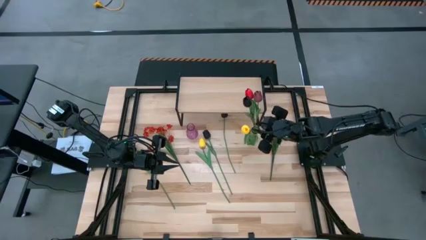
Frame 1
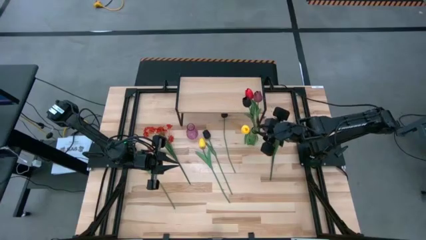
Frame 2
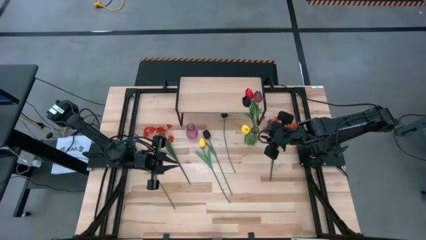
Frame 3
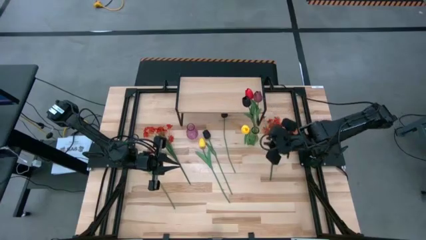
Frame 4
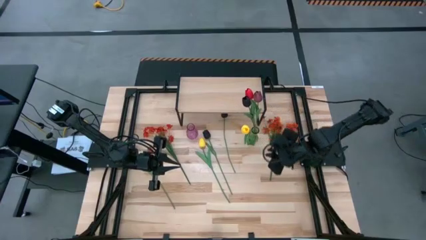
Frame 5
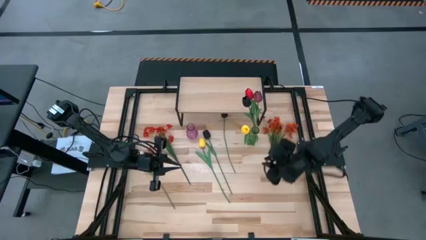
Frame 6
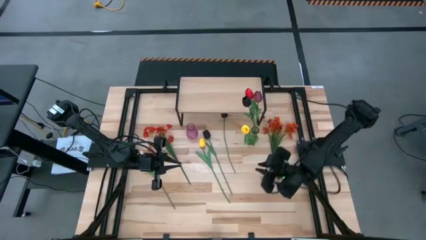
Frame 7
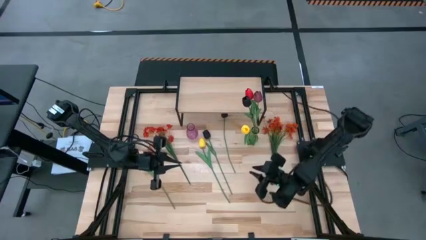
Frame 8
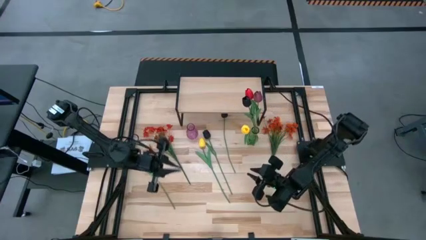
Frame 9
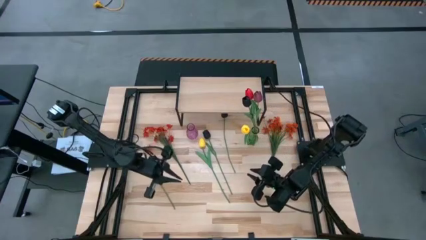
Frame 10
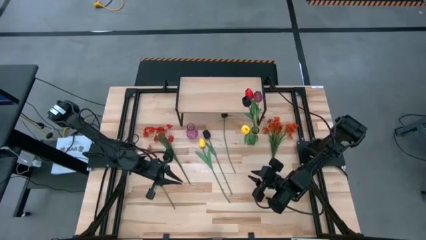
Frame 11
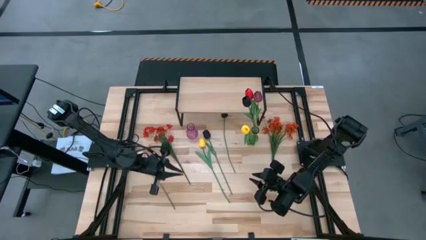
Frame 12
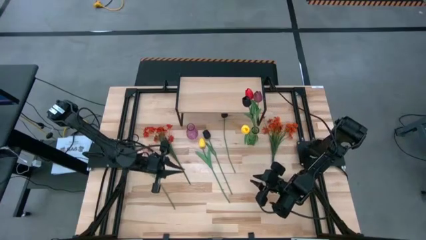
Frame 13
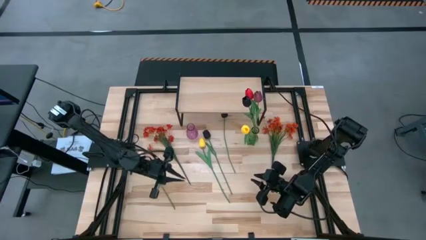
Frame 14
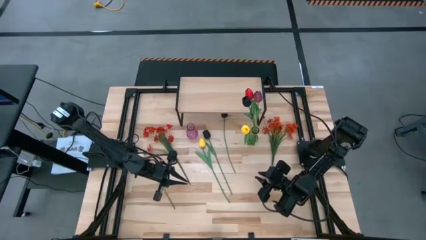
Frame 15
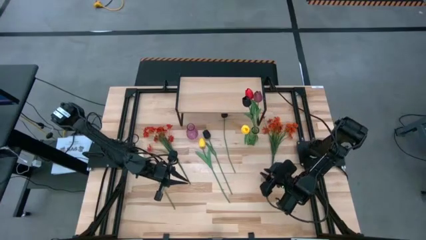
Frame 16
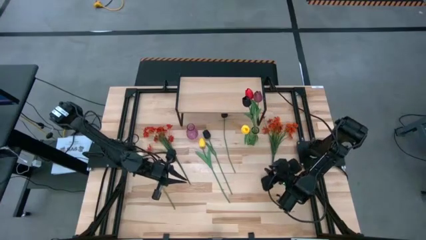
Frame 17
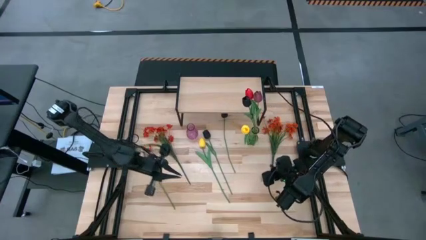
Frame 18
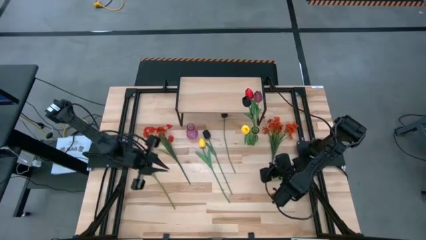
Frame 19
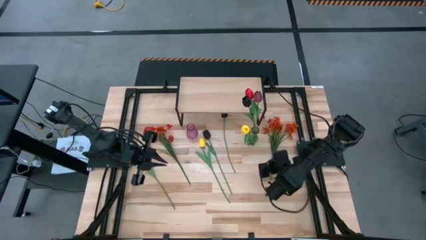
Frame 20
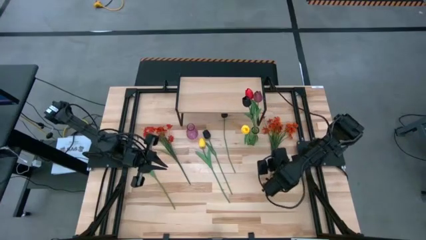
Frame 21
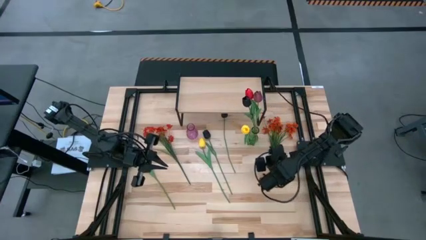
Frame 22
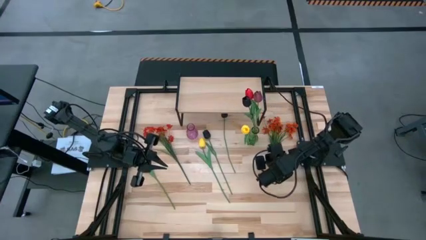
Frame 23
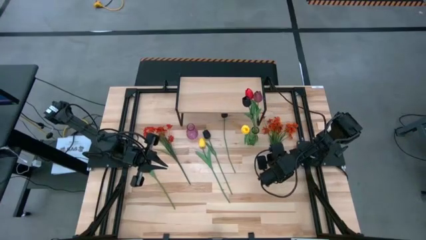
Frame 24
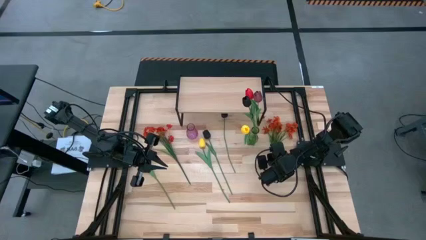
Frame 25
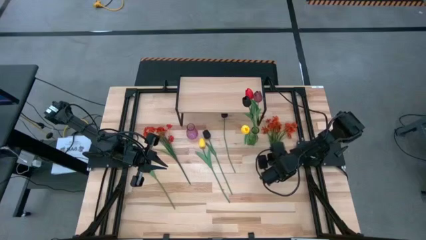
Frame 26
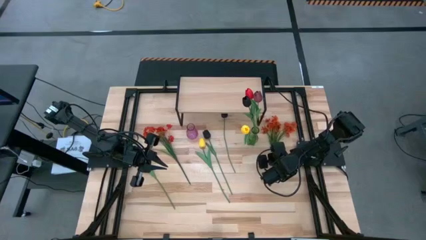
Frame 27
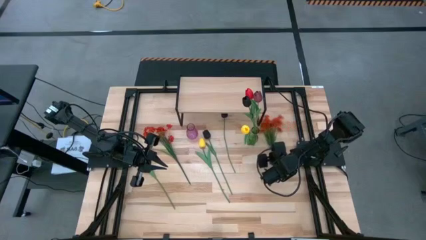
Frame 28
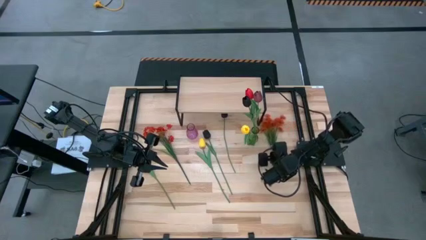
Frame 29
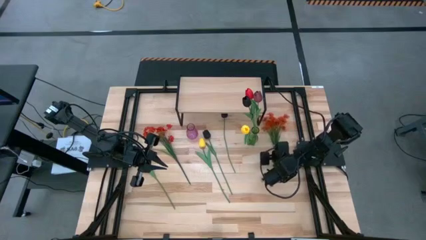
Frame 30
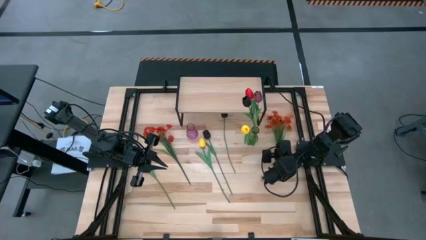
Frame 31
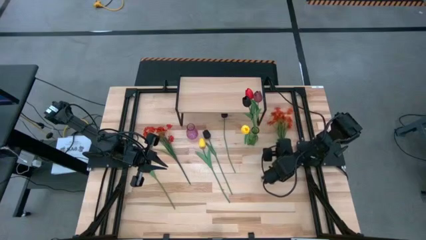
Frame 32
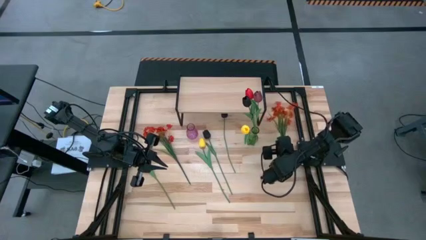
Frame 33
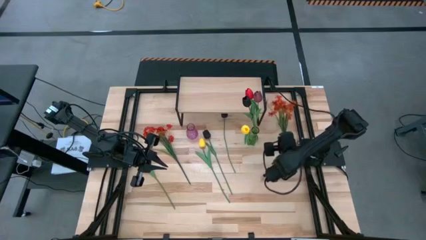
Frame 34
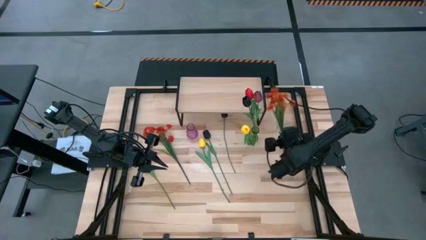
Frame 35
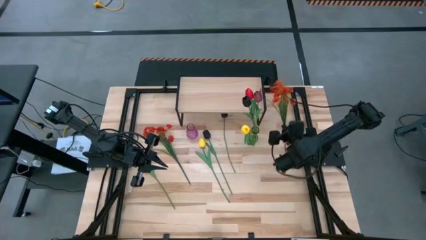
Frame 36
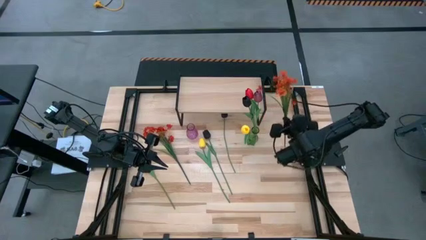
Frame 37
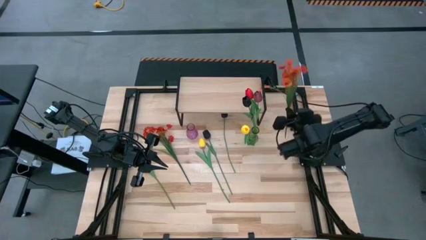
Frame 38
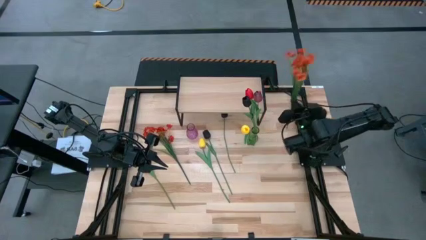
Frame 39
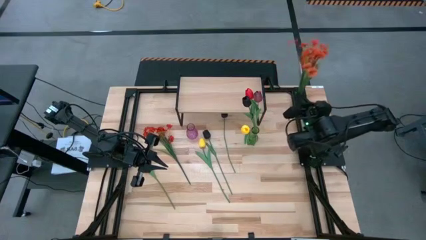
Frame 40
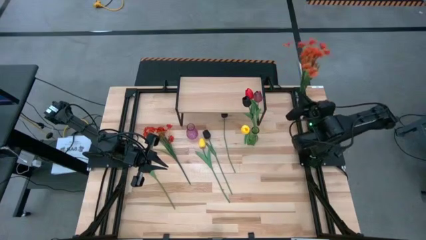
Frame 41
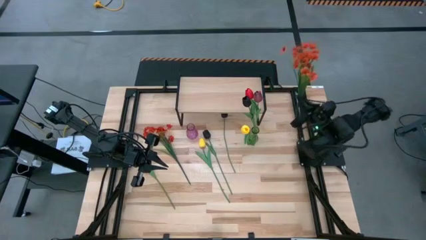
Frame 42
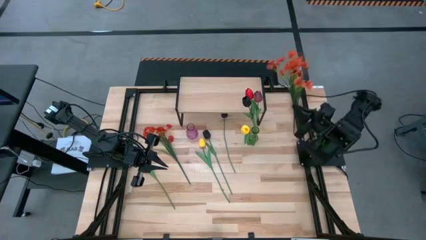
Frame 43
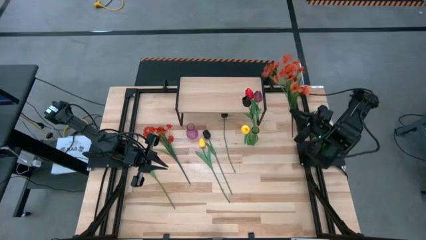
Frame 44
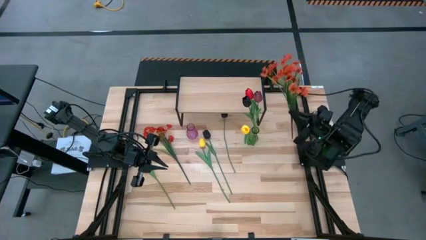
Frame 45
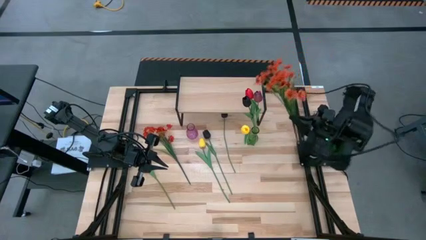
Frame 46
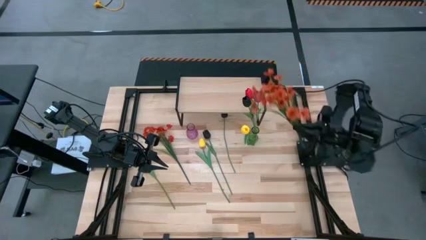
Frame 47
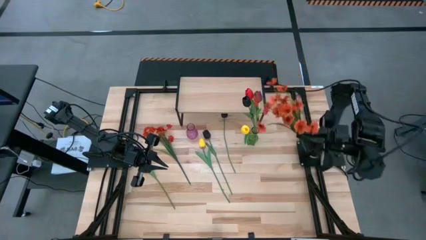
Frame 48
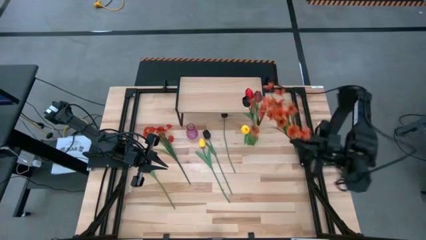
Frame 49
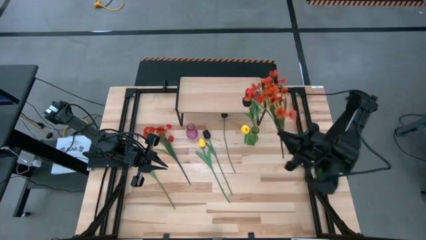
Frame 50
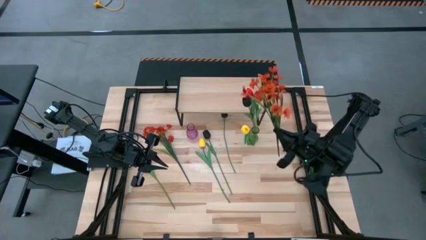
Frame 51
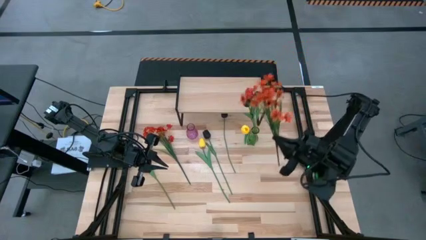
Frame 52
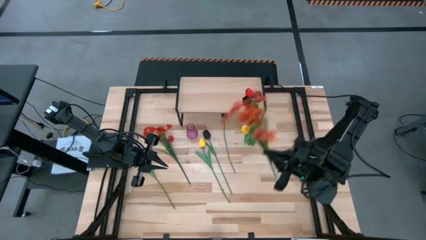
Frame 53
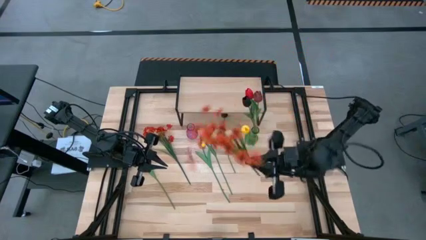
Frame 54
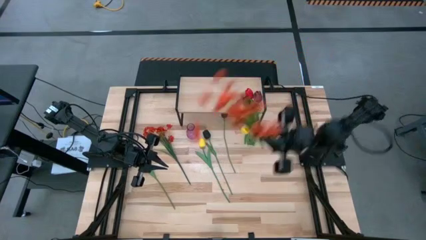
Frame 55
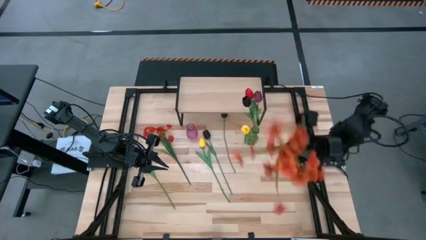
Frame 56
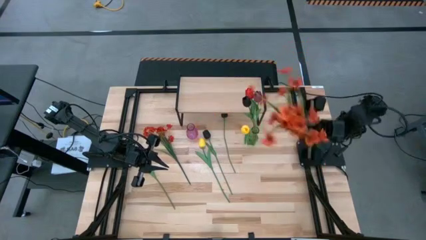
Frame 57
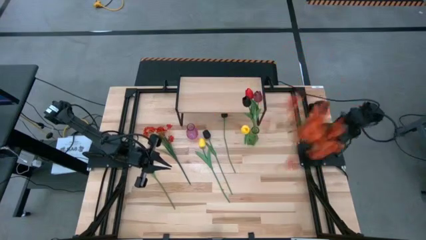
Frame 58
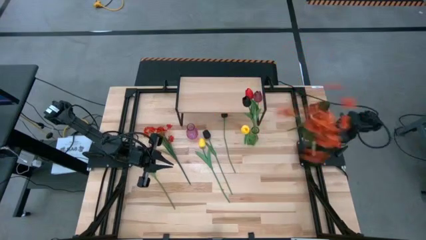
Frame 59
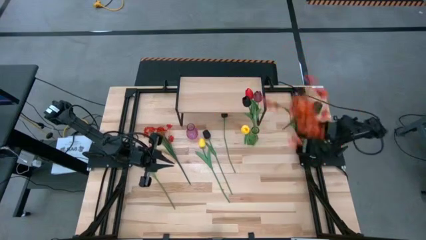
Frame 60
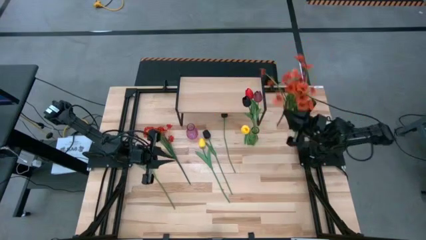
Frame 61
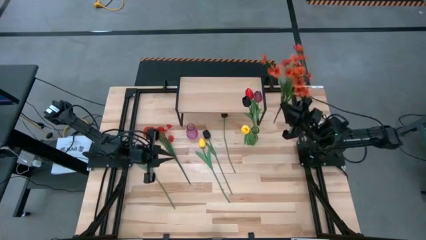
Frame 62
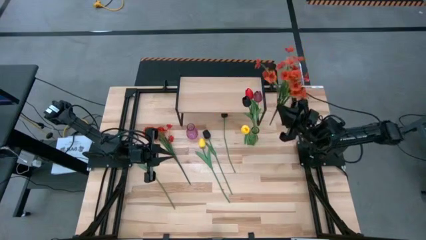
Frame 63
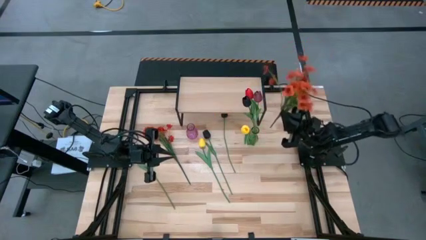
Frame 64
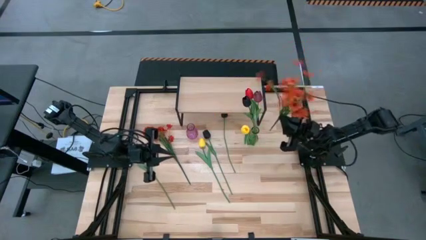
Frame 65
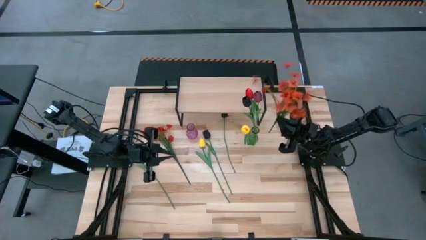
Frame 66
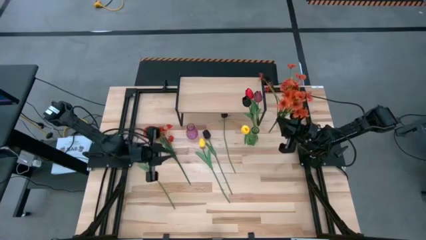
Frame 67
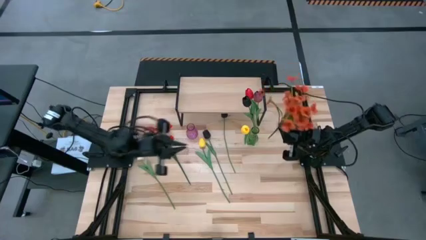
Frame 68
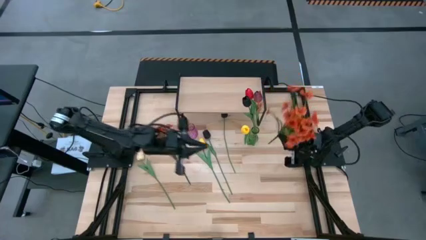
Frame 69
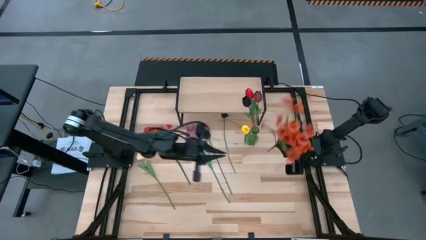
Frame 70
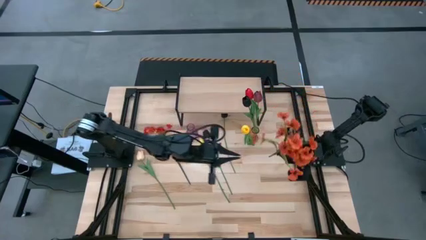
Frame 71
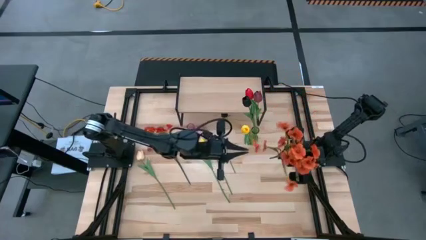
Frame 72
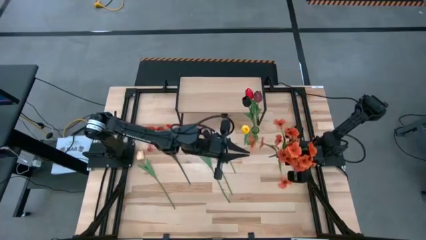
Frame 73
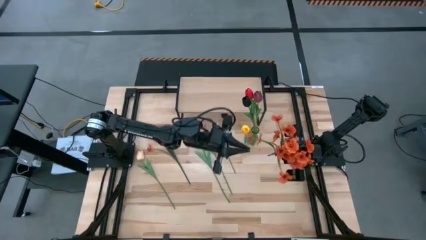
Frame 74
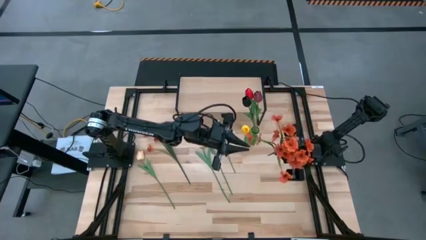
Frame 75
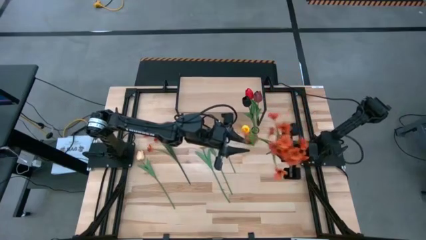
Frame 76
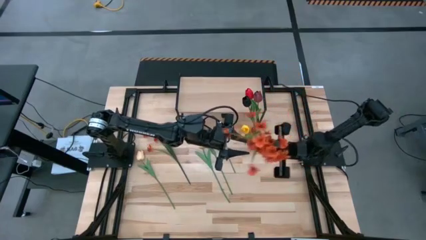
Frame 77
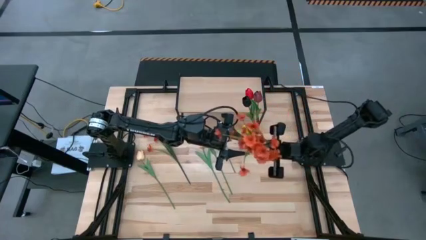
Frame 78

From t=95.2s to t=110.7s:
Task: Pick and place flowers into a vace then onto a shelf
Put the right orange flowers into the green vase
